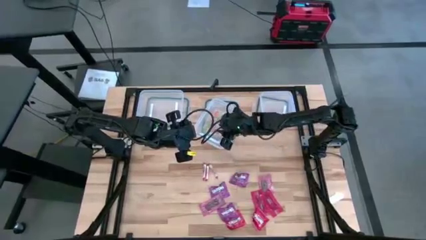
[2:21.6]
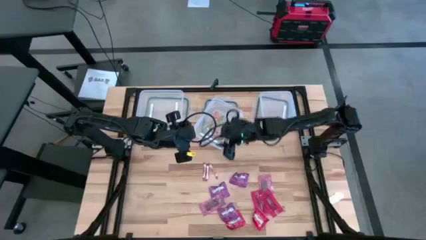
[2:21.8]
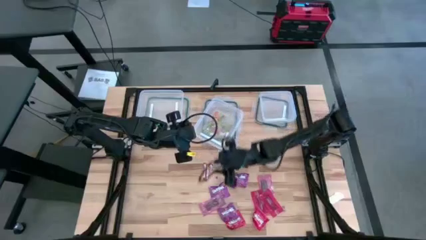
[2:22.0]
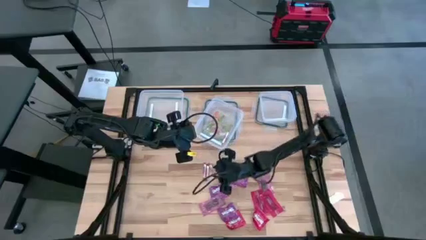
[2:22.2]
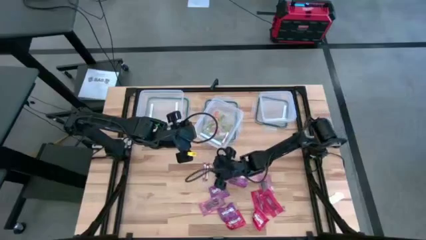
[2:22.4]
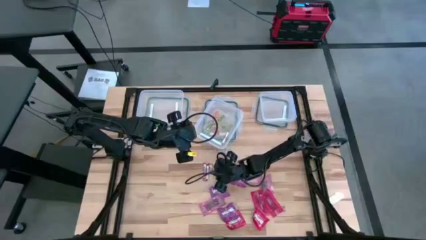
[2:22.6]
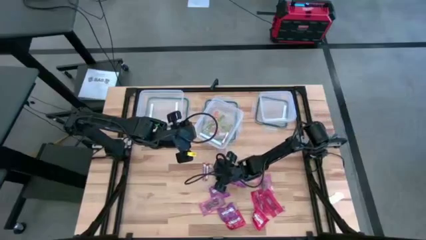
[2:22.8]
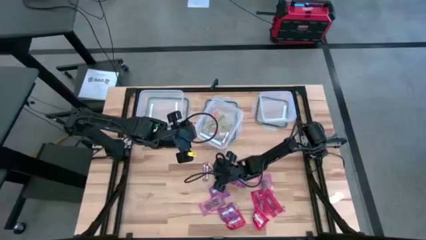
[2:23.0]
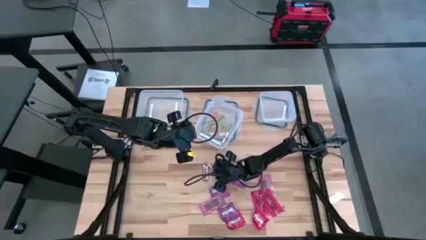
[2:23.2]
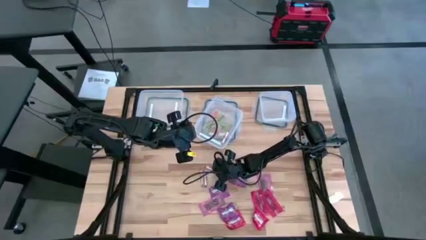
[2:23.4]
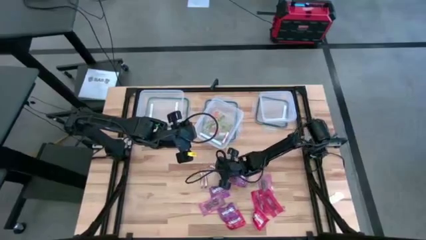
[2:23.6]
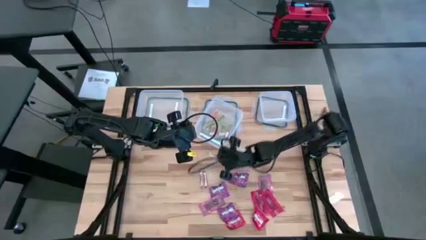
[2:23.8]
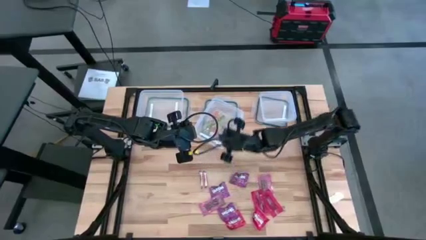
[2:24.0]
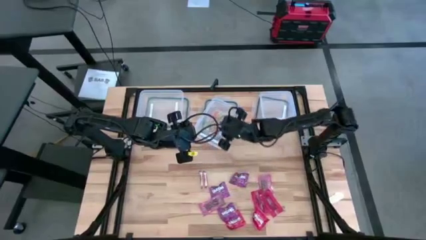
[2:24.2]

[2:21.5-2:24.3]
Task: Sort candy
Put the middle right white candy into the center transparent bin

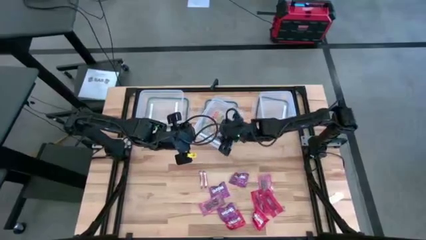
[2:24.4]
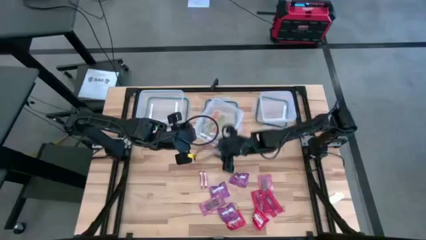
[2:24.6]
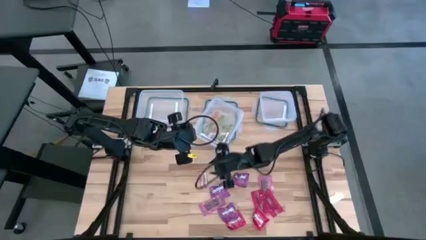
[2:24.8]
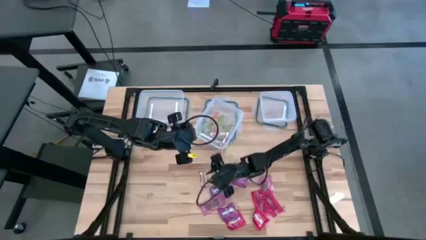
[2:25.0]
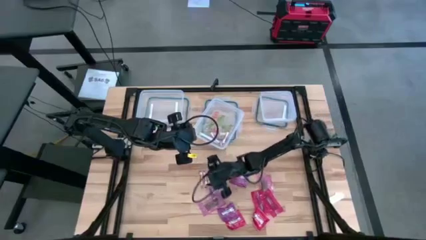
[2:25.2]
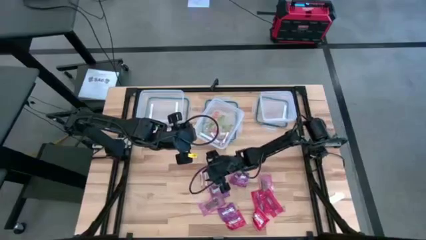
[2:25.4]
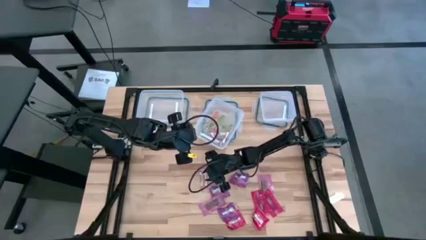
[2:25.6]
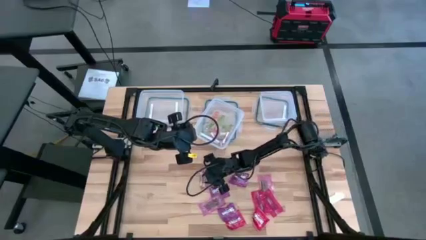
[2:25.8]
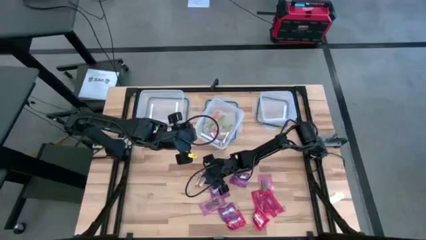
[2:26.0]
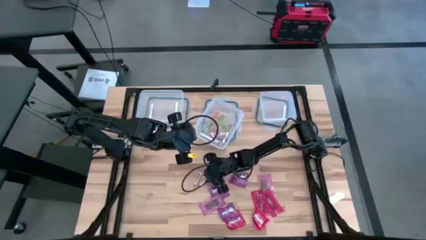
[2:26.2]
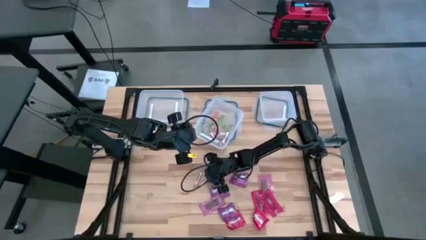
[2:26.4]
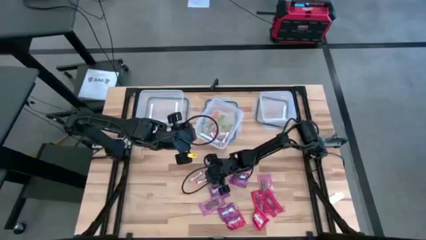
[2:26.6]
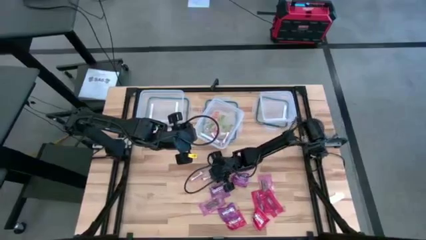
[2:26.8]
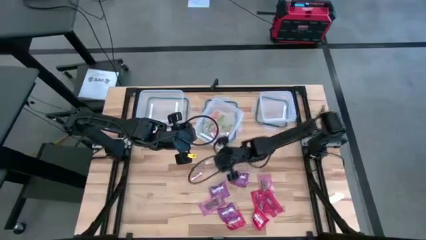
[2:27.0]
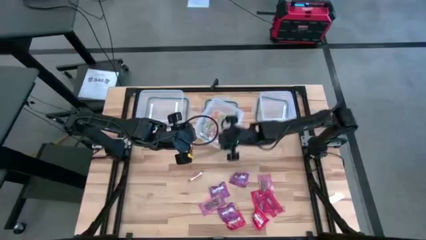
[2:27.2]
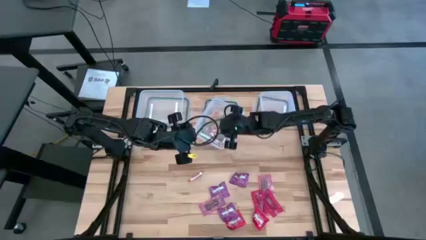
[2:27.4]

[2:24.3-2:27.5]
Put the right white candy into the center transparent bin

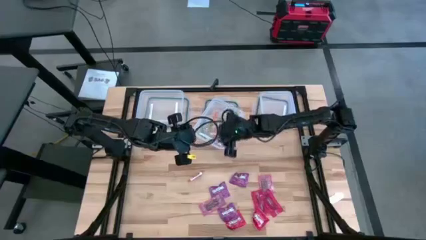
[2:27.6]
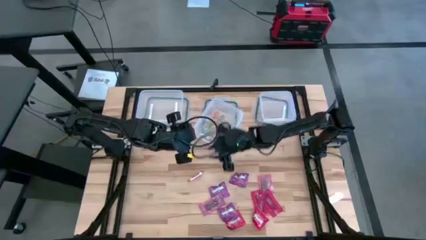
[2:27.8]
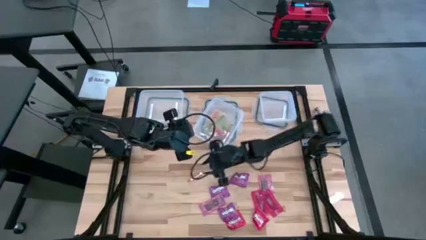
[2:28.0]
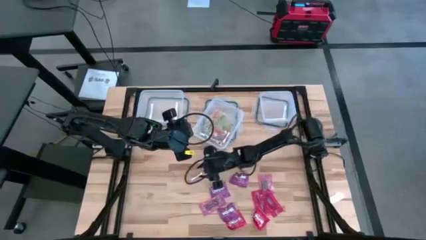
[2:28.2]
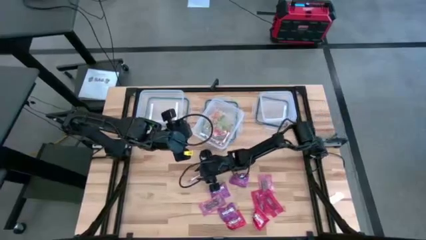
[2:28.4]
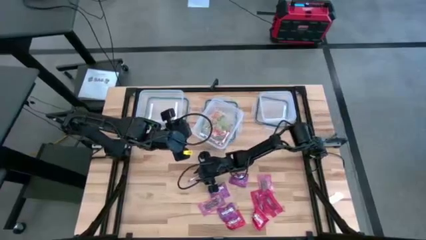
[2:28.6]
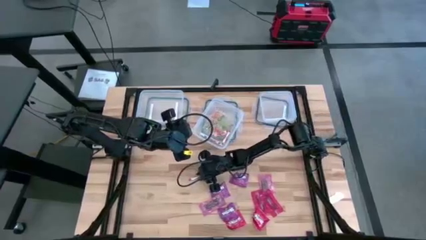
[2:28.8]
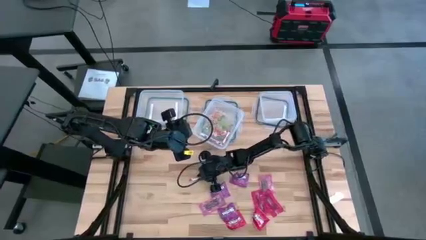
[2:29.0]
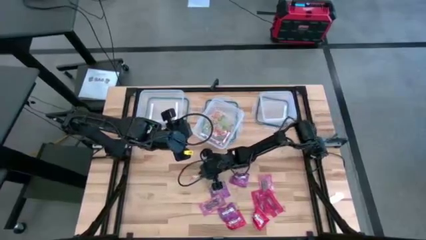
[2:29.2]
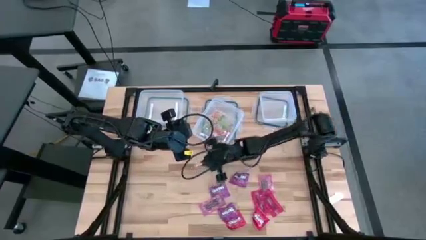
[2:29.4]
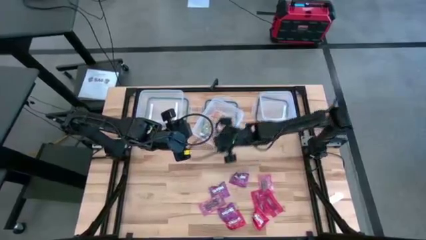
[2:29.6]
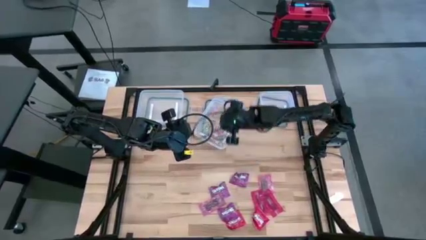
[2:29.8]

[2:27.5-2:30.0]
Put the white candy into the center transparent bin

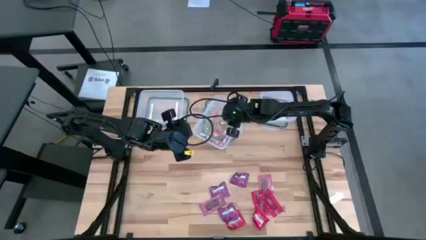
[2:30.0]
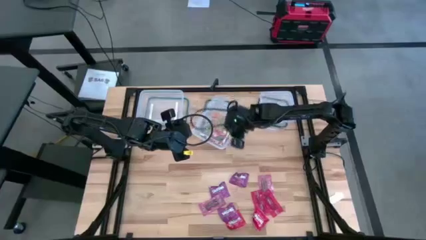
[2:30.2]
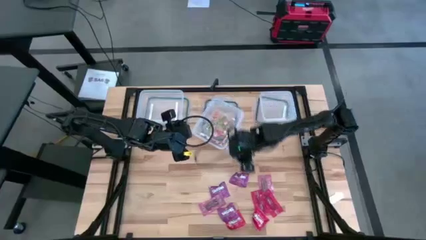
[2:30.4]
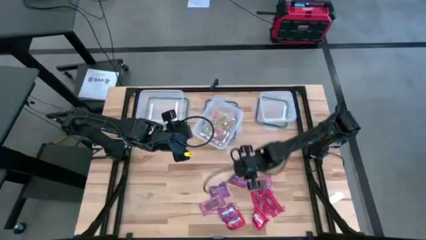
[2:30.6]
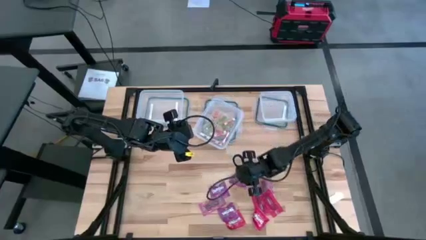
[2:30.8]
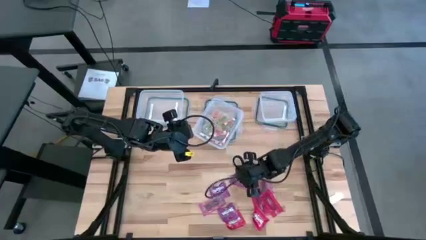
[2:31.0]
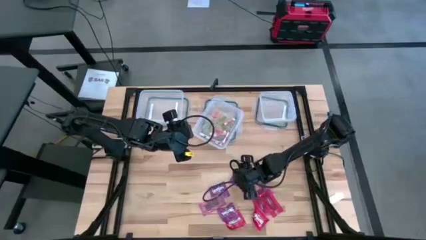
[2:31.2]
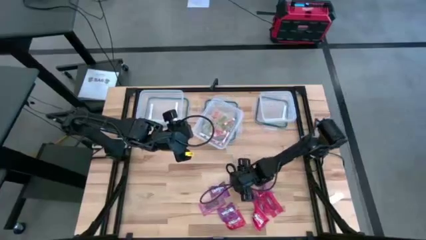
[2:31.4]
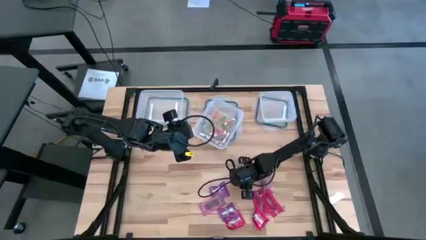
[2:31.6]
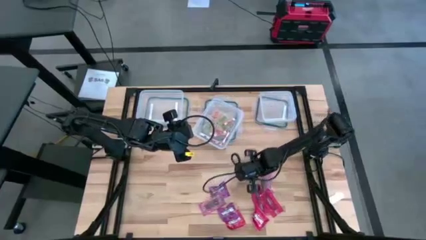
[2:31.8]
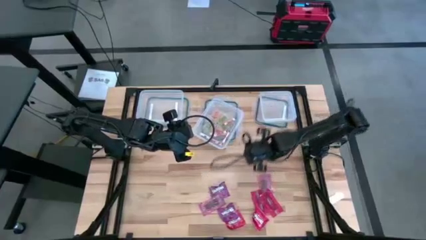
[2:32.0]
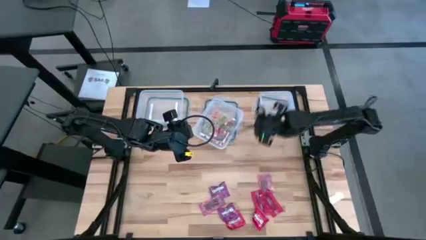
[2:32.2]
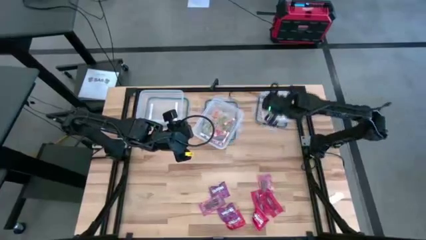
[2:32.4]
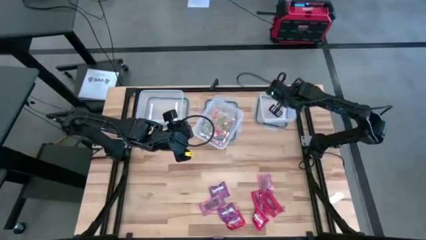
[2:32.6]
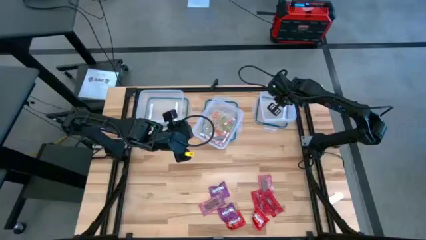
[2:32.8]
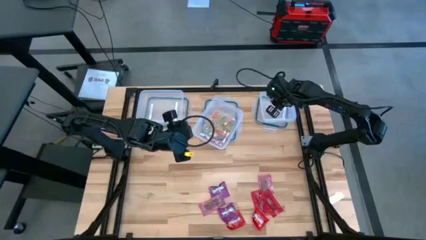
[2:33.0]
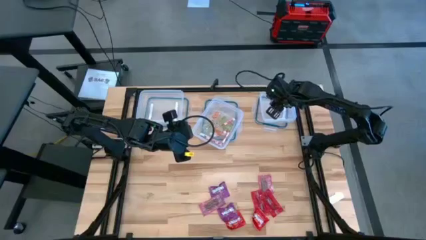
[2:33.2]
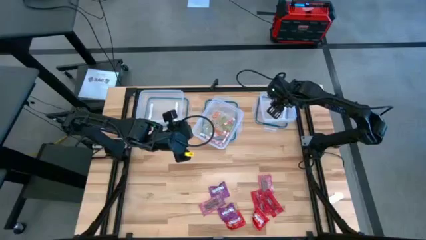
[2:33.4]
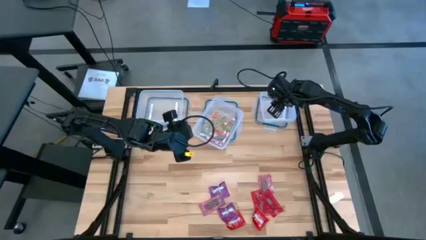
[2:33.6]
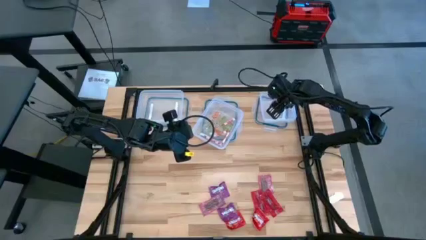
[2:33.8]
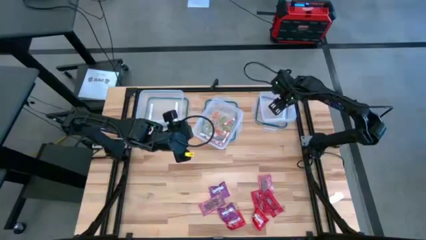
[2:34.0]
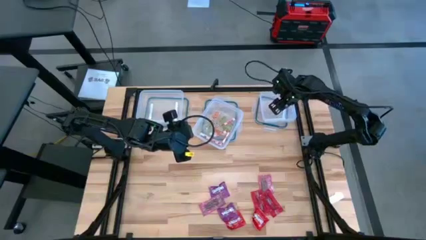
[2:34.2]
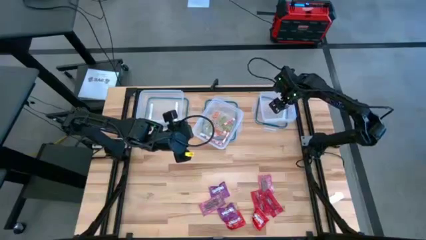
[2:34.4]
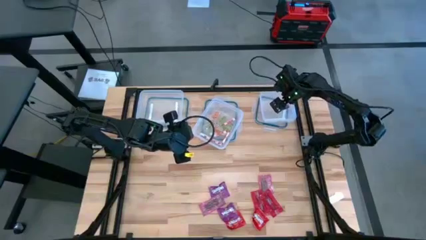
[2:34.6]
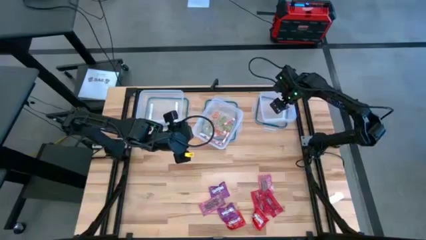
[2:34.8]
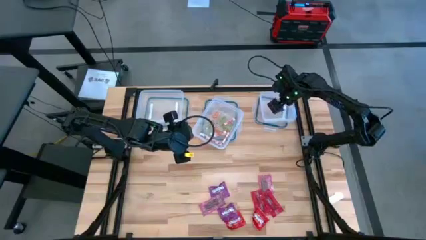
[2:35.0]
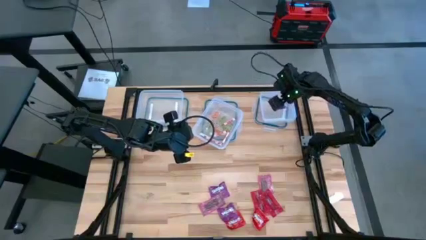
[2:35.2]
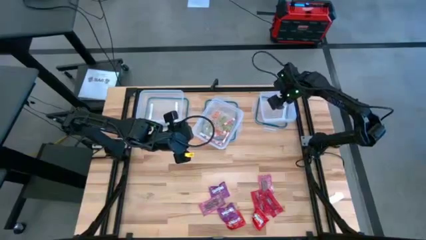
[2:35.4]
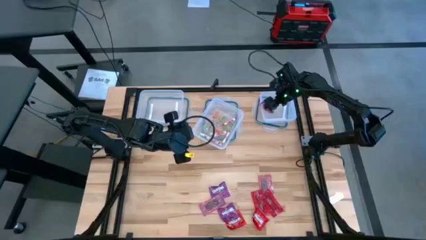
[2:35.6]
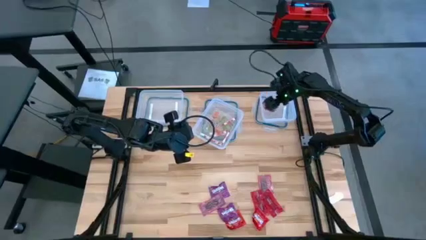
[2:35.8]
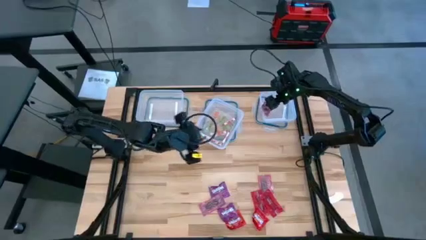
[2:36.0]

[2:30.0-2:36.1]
Put the top right violet candy into the right transparent bin

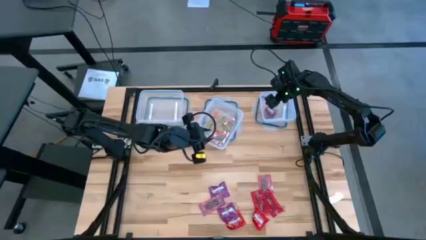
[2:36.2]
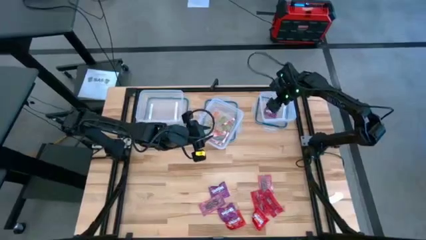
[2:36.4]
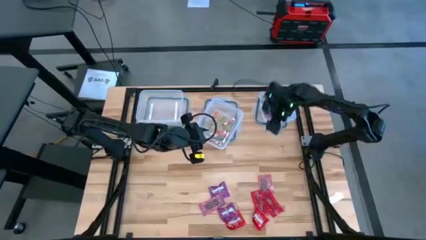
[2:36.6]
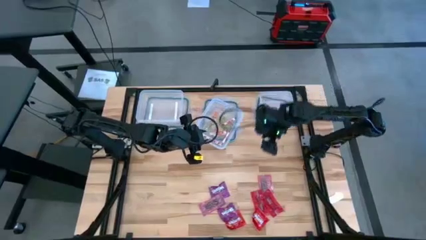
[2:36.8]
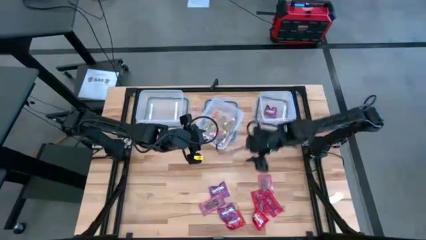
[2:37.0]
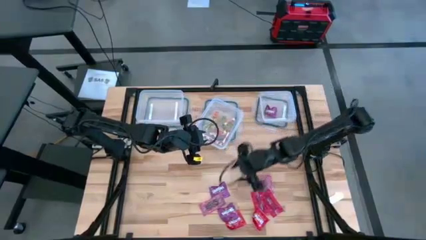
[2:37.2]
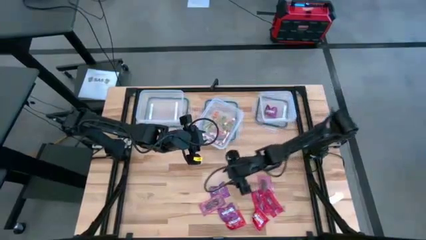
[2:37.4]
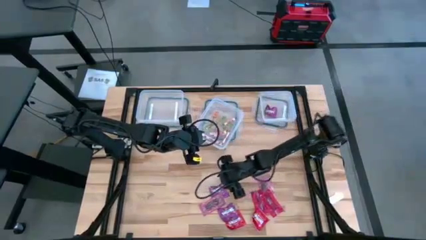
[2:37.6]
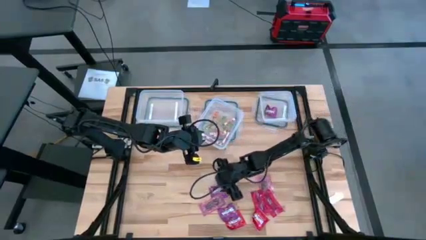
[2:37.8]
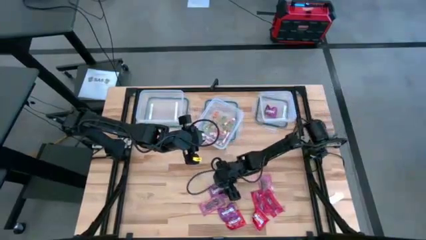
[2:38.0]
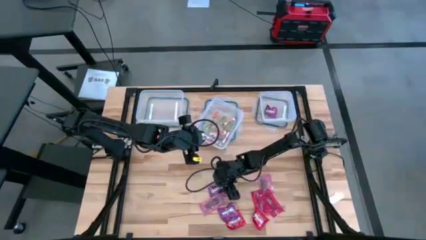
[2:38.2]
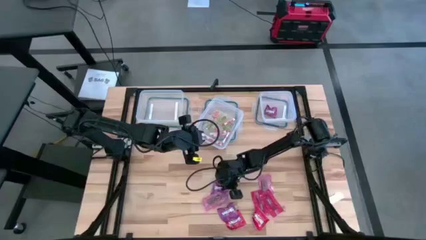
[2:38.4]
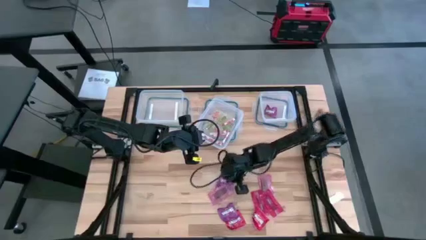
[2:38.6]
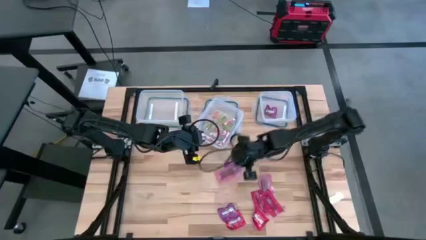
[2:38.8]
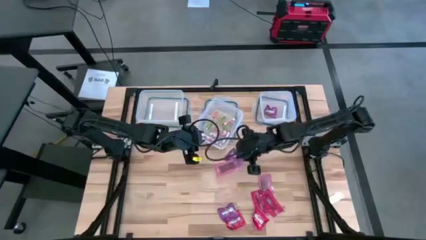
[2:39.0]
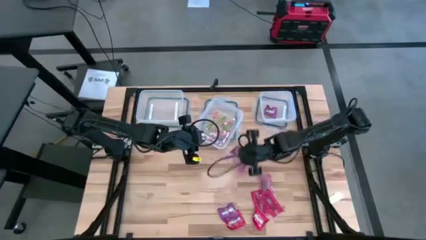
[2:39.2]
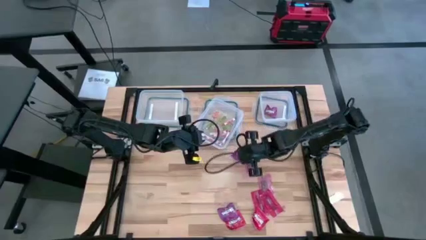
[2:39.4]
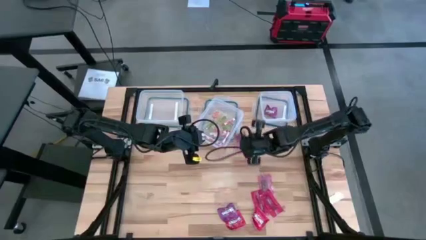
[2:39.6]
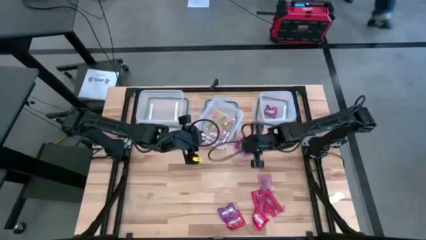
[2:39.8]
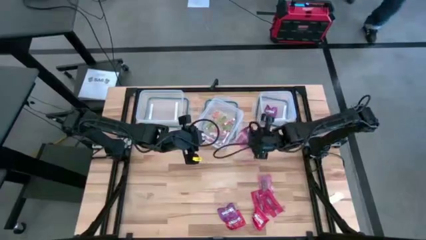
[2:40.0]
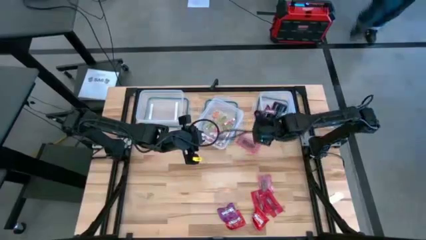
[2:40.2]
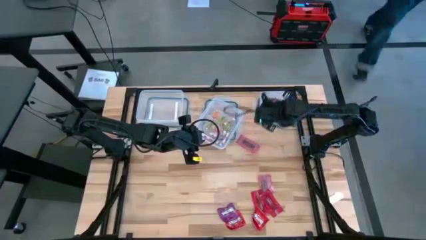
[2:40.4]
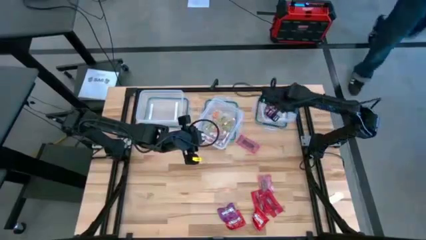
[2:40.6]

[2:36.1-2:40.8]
Put the top violet candy into the right transparent bin
